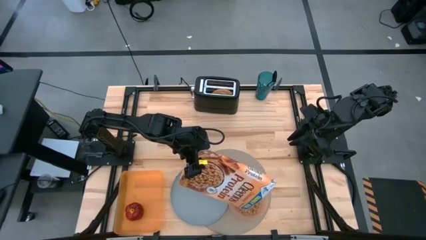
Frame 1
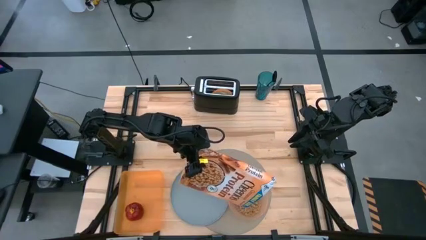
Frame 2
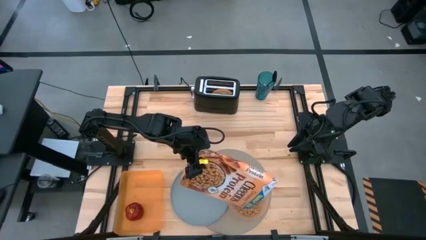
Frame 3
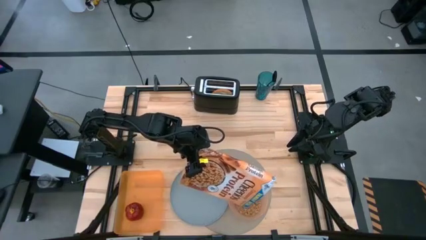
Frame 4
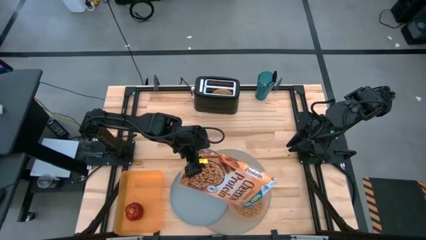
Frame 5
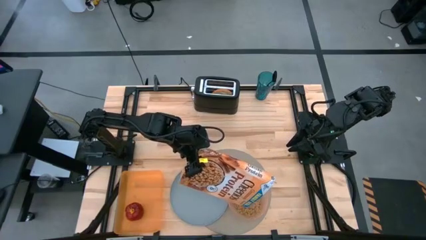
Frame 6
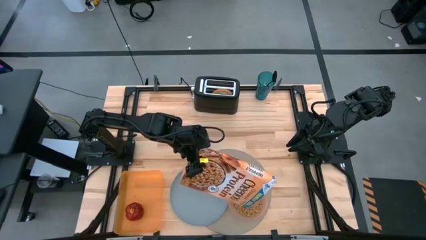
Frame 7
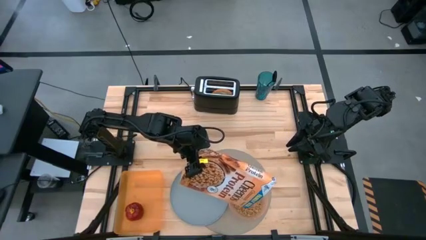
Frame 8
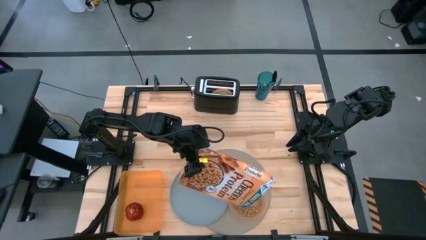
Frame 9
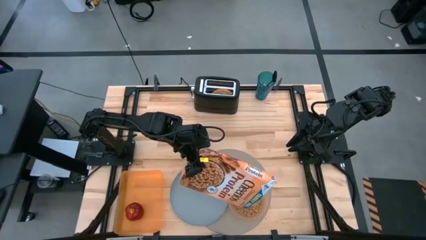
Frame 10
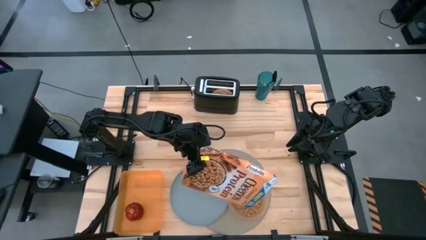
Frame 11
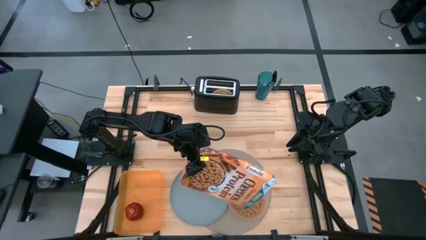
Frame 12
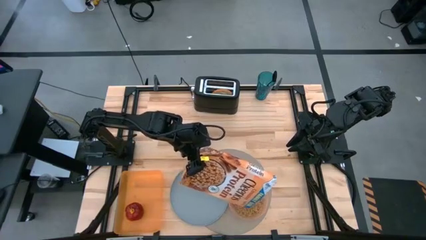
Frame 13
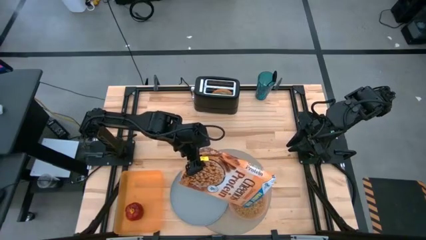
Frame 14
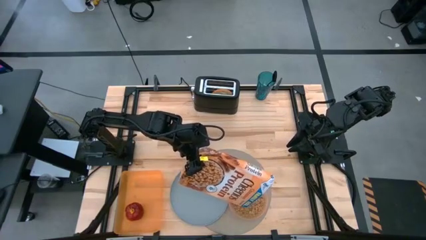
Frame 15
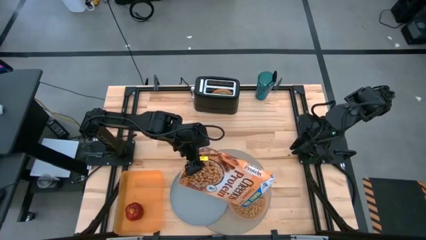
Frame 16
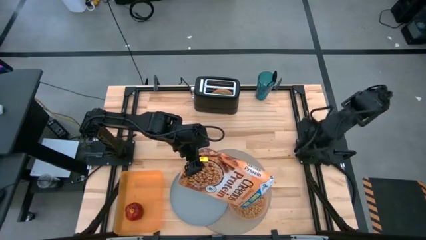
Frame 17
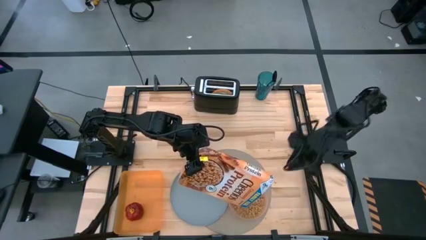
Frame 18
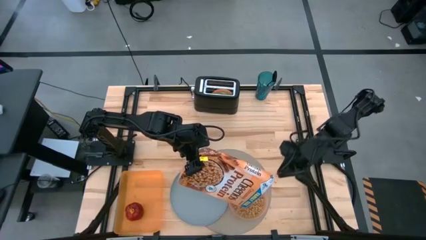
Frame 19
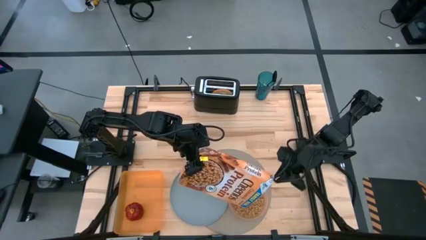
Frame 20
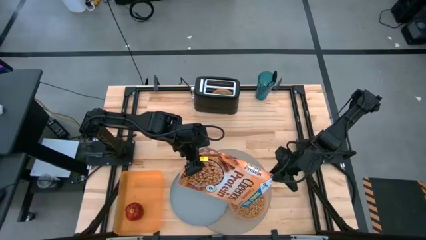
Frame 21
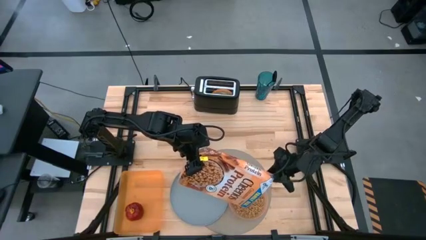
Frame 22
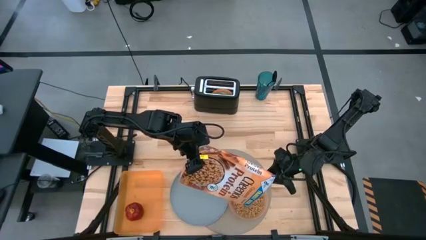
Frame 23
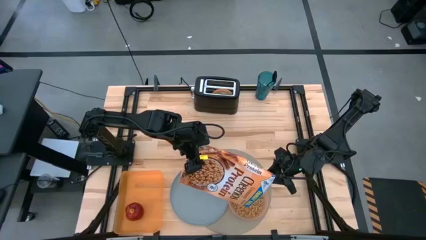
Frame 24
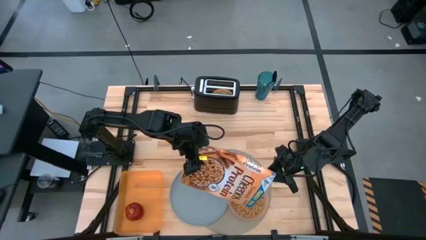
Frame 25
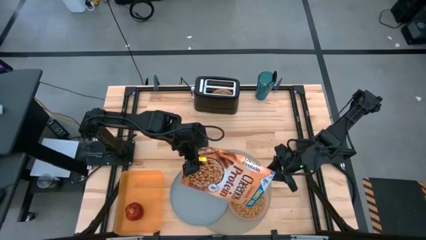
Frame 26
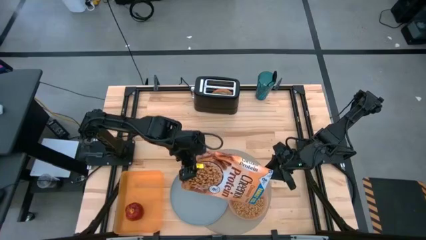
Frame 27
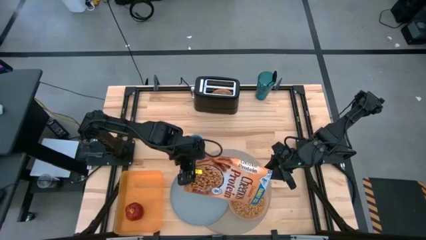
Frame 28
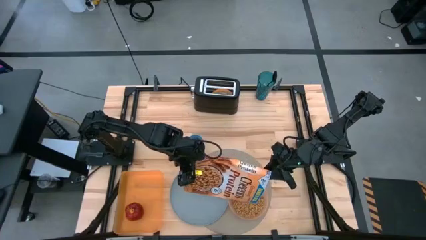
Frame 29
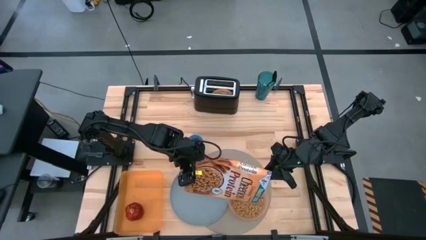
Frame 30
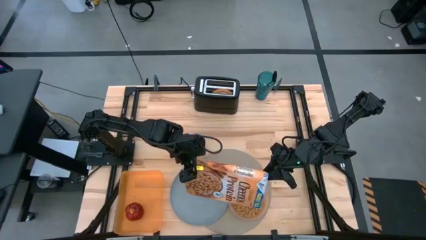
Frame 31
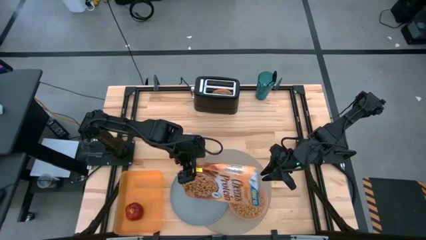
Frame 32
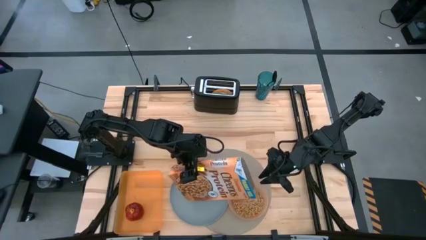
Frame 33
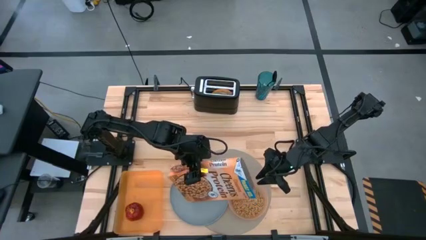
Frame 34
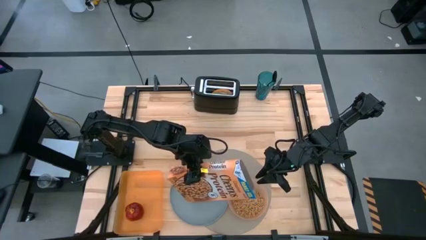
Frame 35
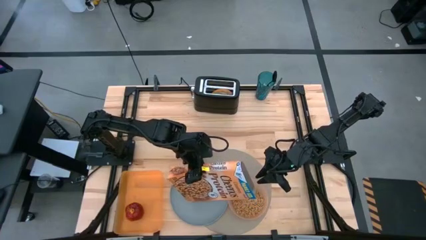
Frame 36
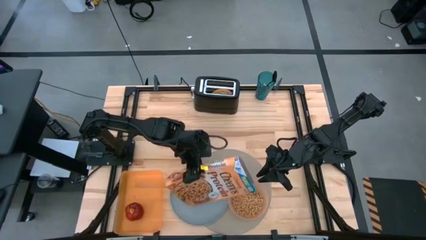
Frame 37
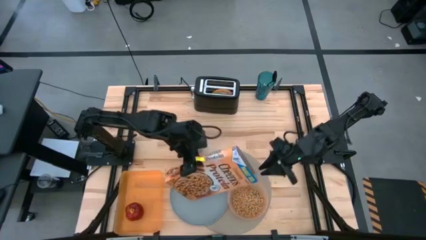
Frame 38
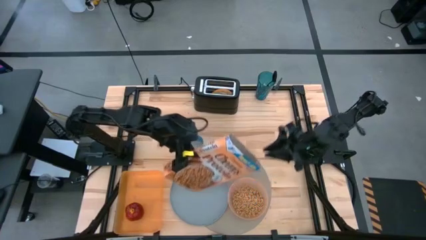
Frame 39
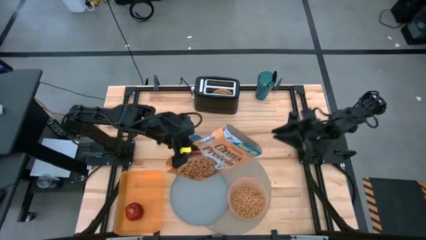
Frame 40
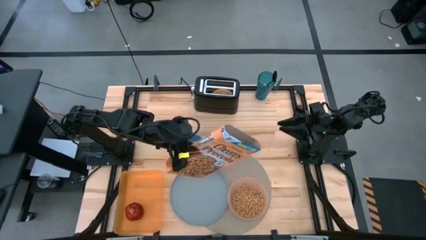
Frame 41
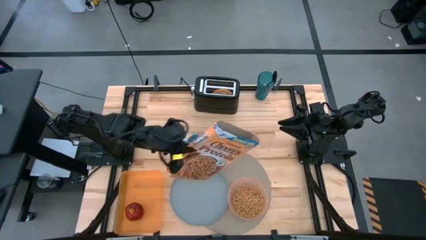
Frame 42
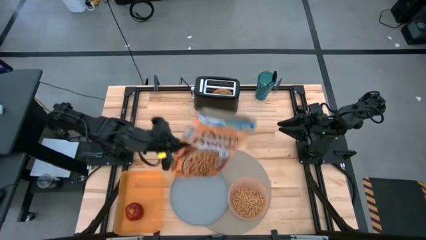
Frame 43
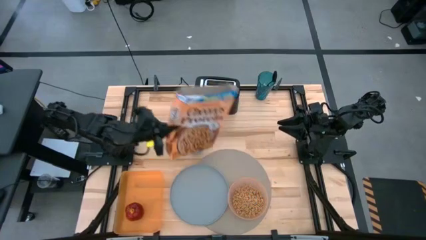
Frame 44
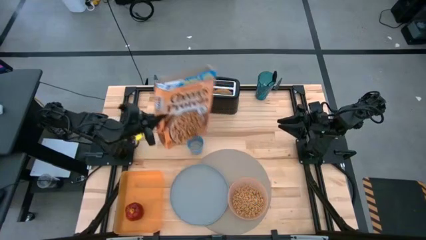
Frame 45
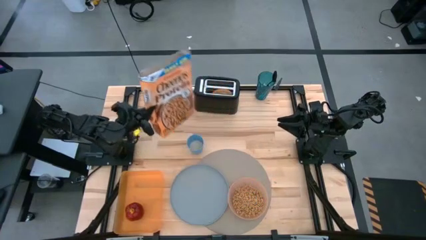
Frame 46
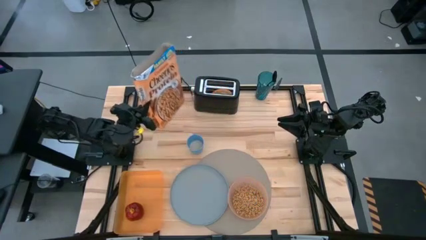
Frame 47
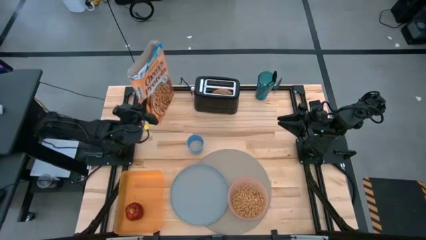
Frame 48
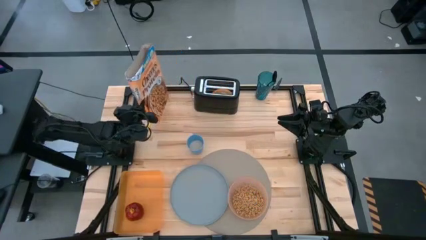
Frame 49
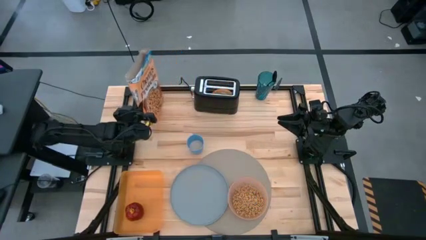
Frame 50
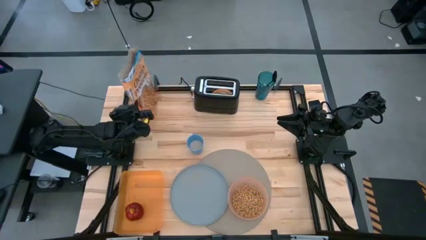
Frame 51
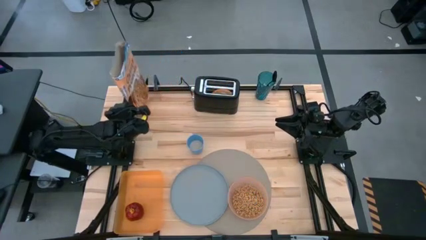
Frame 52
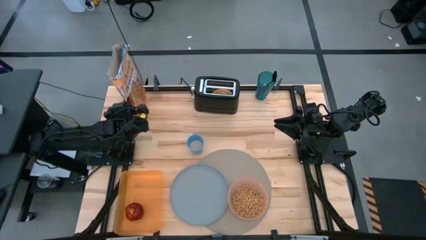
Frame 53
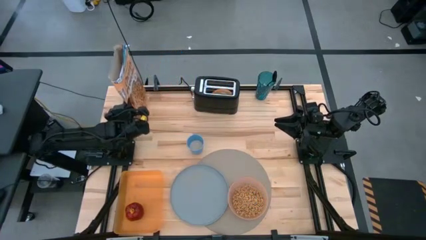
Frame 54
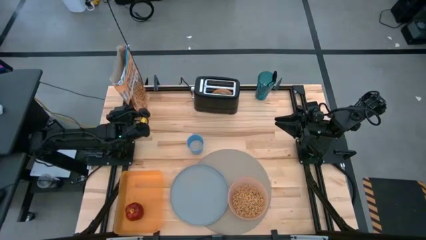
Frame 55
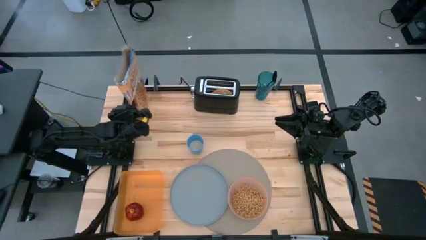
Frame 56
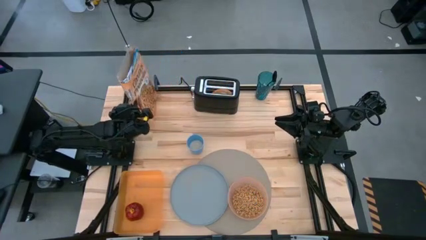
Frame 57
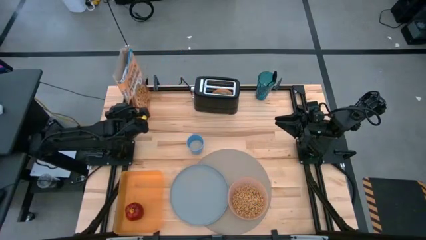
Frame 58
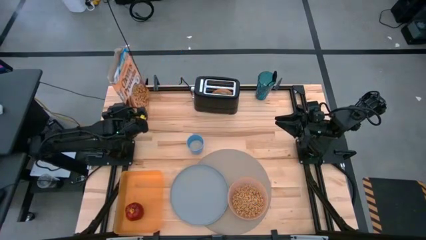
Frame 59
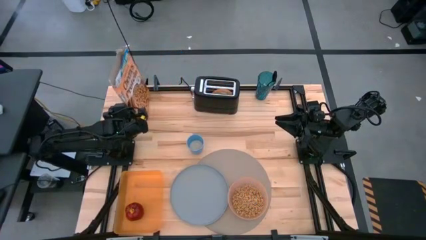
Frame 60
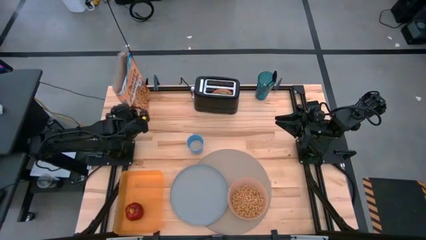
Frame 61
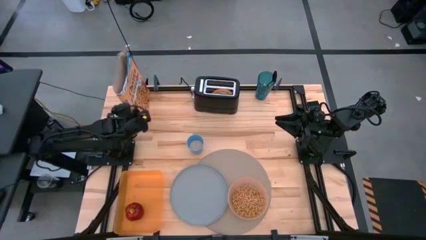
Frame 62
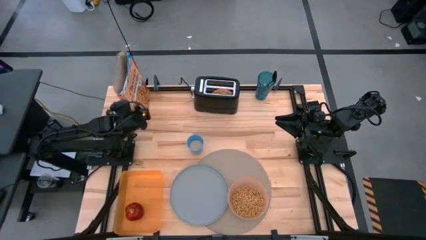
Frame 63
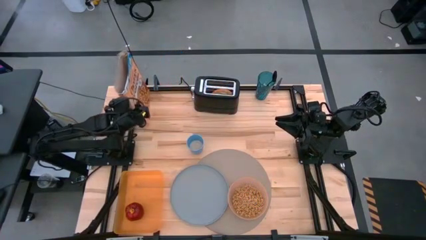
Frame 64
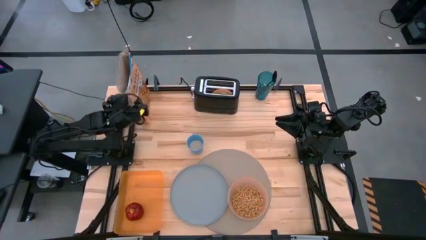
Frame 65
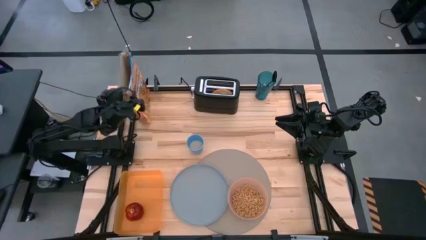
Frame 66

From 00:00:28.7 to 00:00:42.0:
Task: Arrange a breakfast setting
Pour the cereal from the cereal box into the orange bowl
